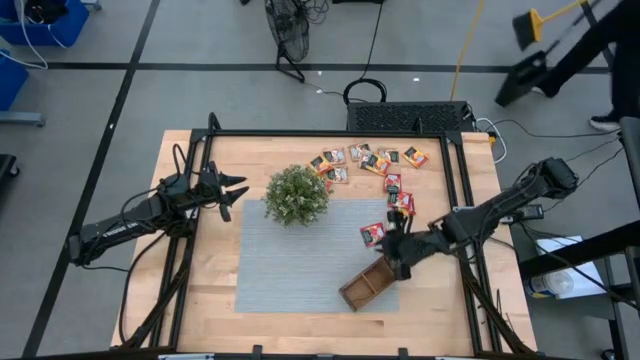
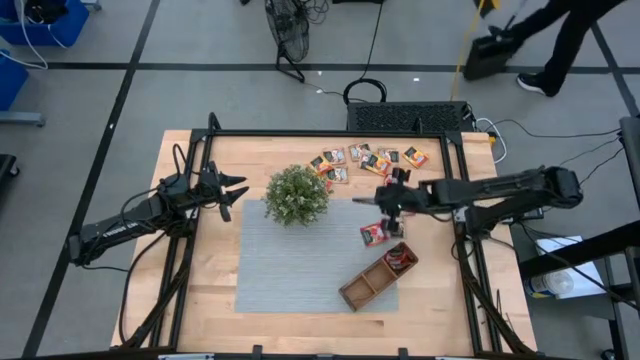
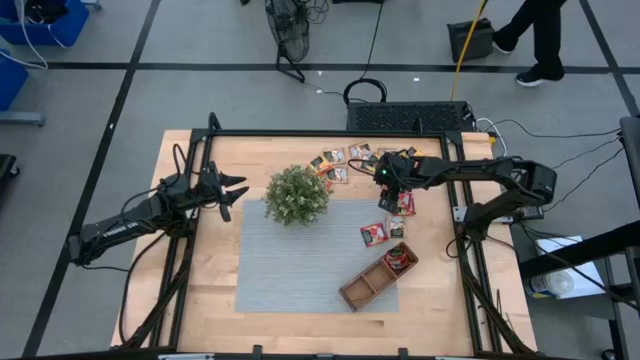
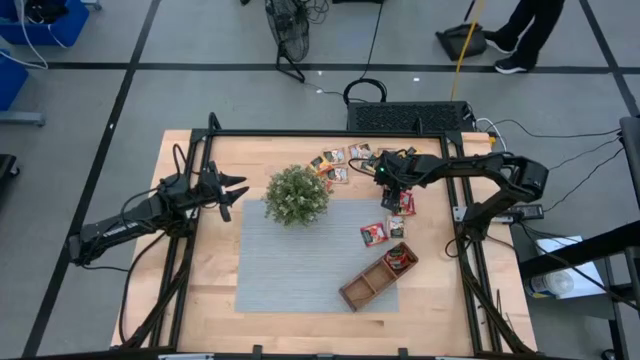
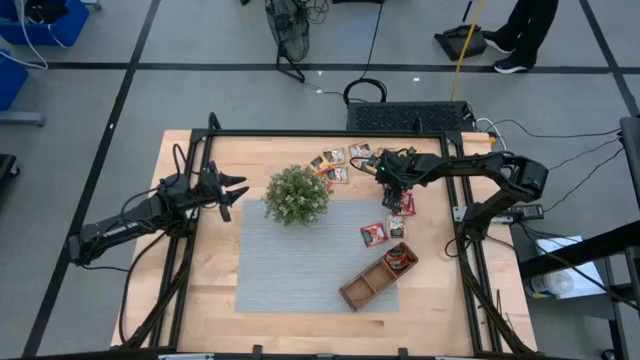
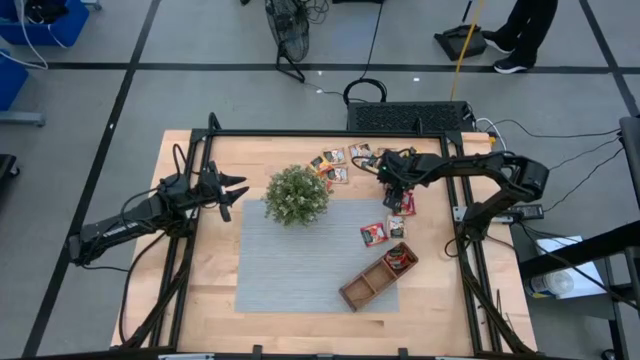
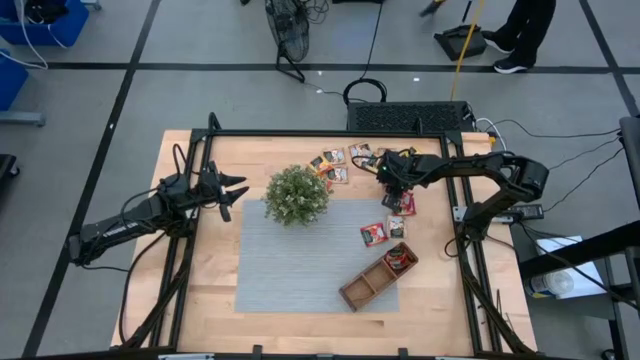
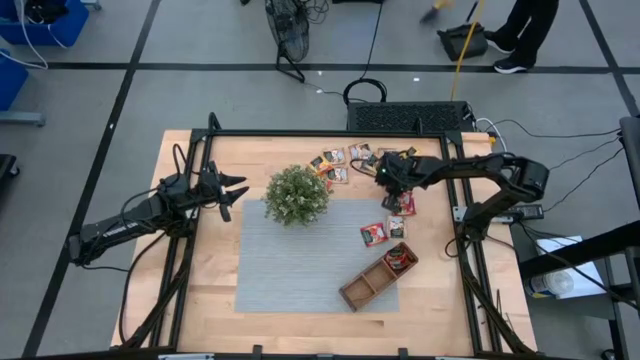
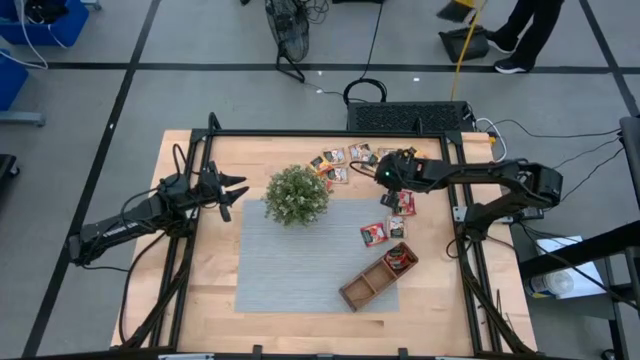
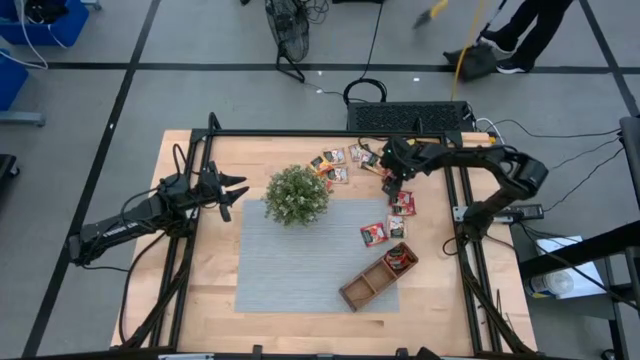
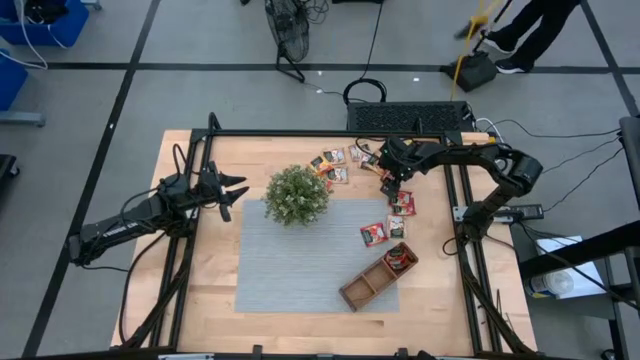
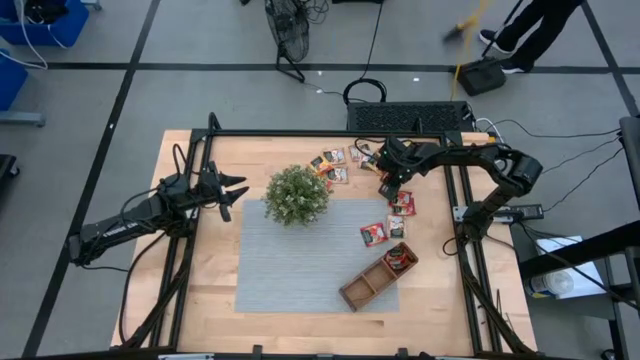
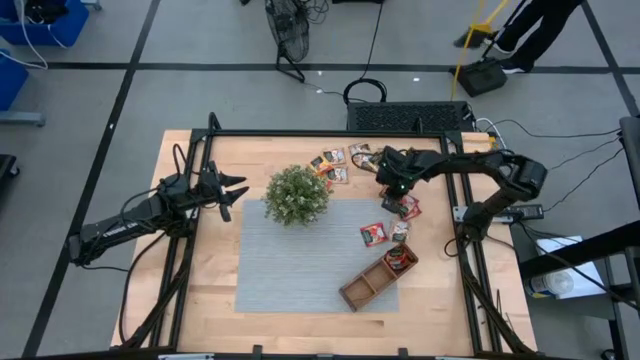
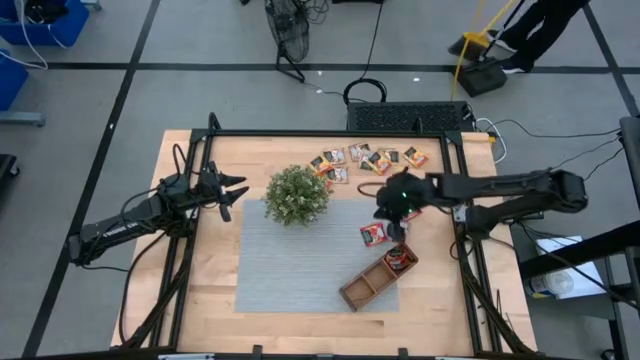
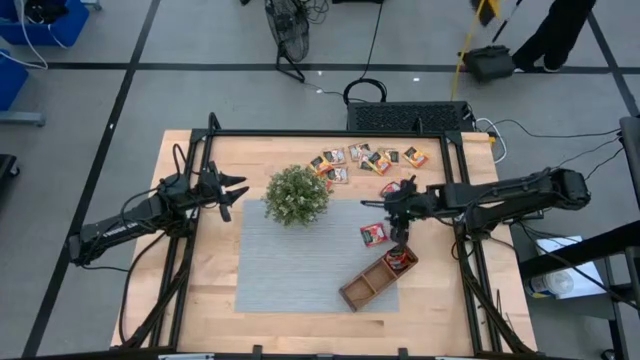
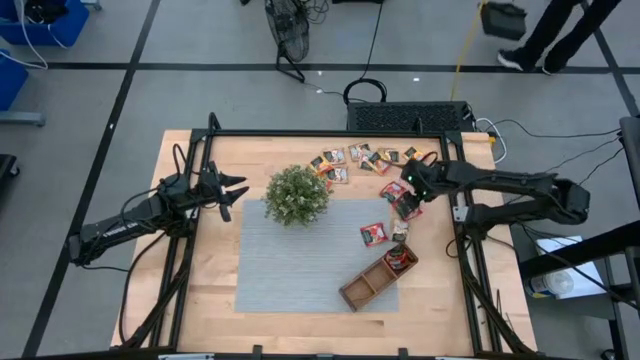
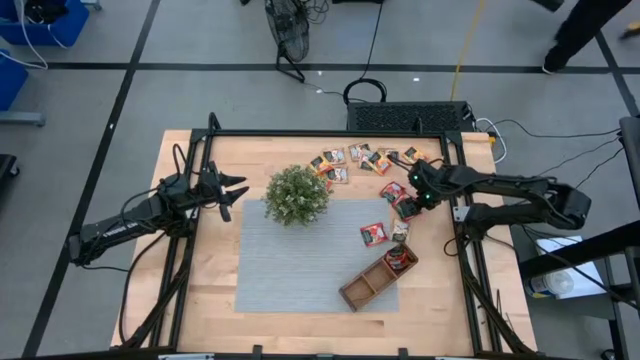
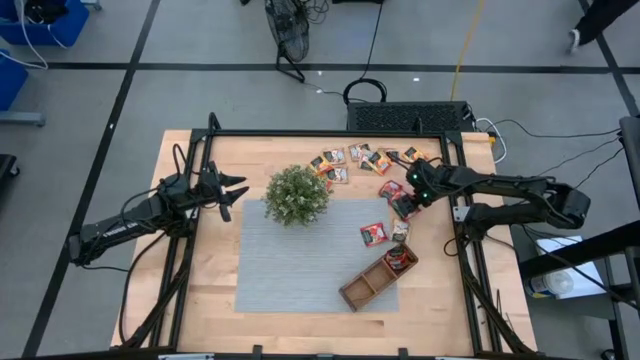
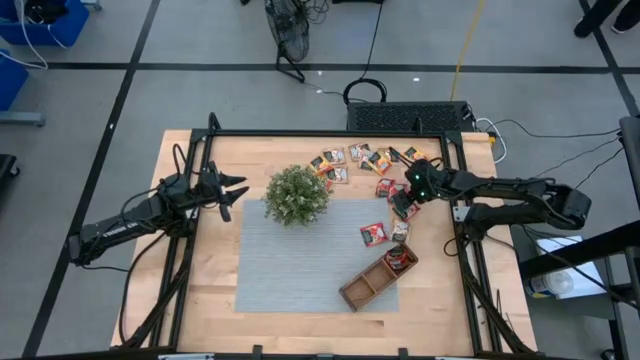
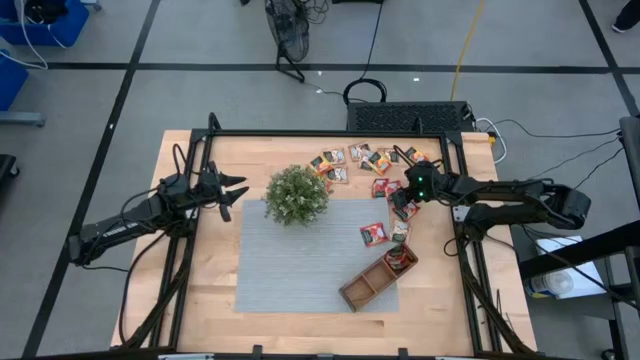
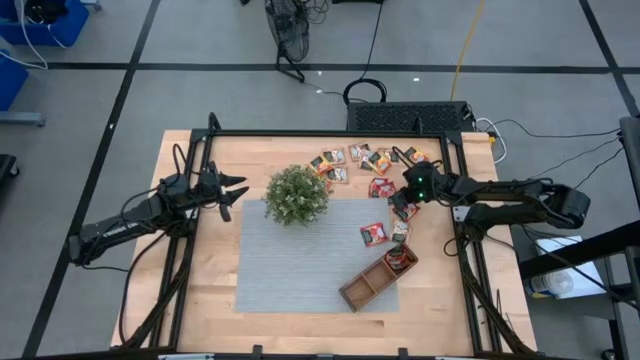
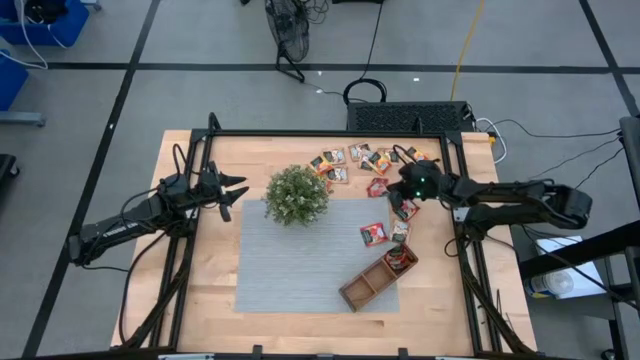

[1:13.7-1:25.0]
Task: Pick & Place Tea
Put the strawberry tea sachet into the brown organizer
